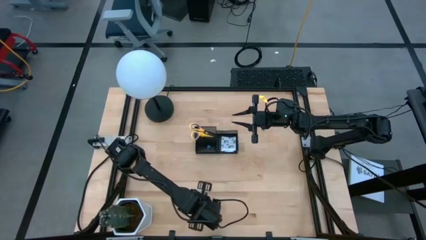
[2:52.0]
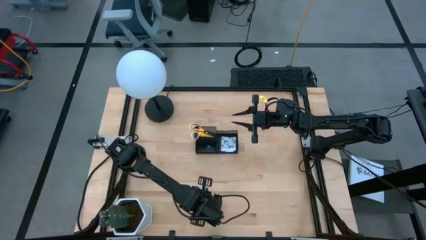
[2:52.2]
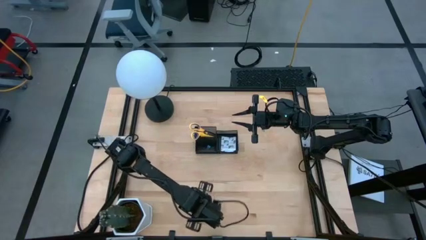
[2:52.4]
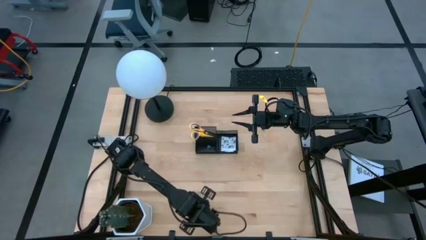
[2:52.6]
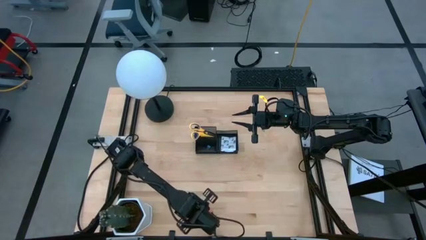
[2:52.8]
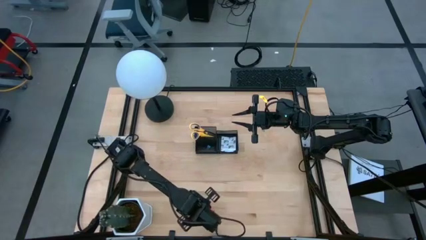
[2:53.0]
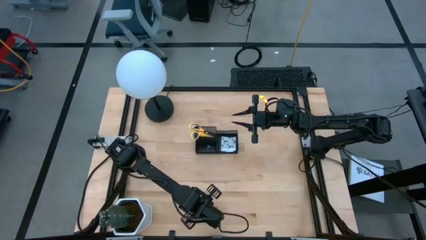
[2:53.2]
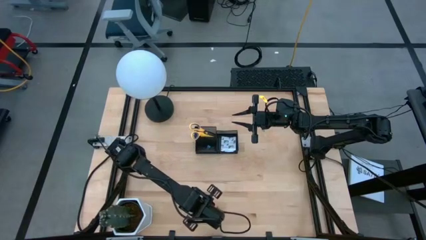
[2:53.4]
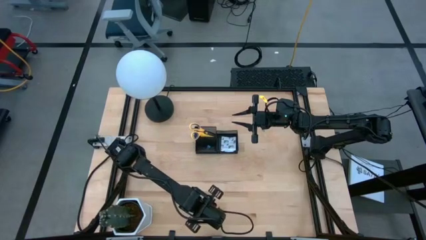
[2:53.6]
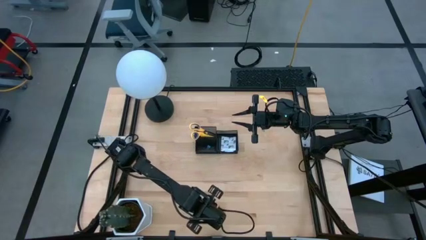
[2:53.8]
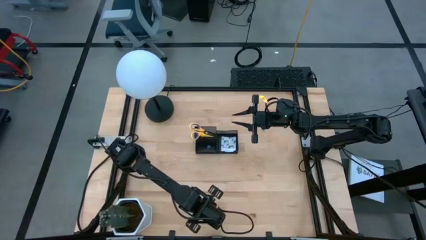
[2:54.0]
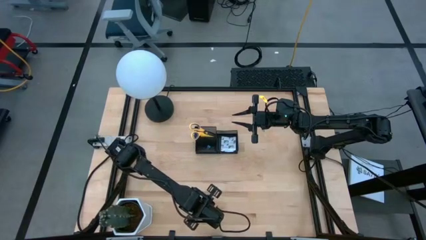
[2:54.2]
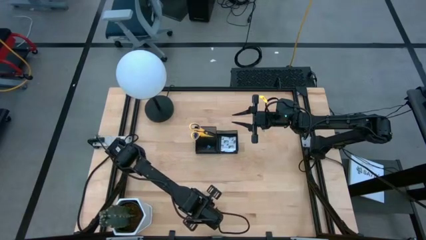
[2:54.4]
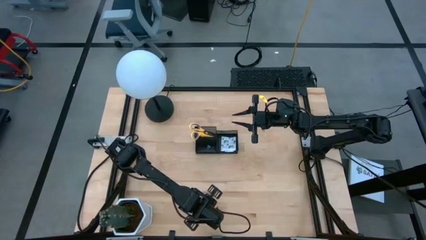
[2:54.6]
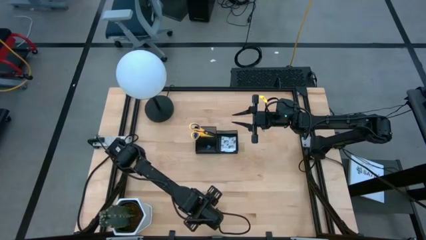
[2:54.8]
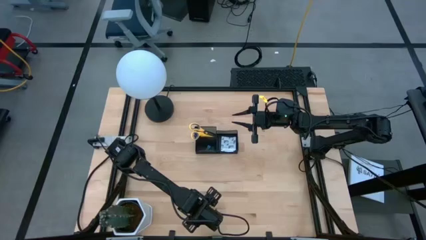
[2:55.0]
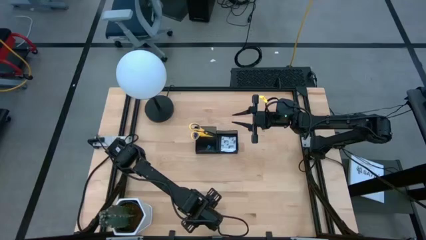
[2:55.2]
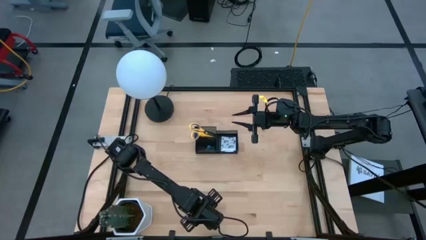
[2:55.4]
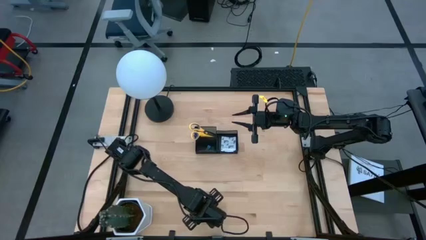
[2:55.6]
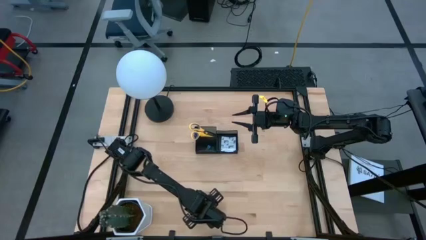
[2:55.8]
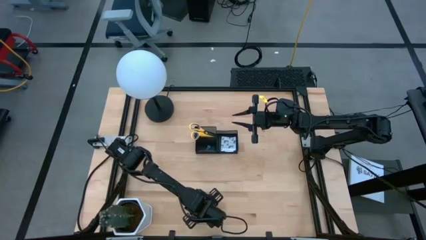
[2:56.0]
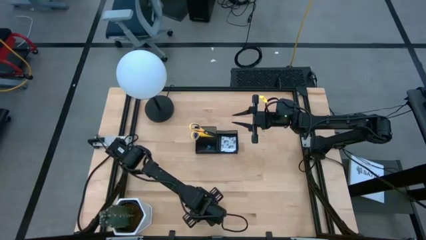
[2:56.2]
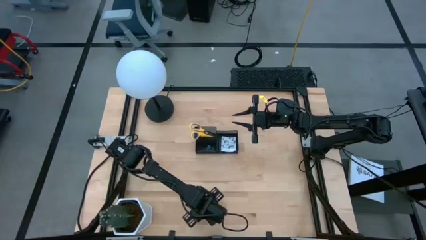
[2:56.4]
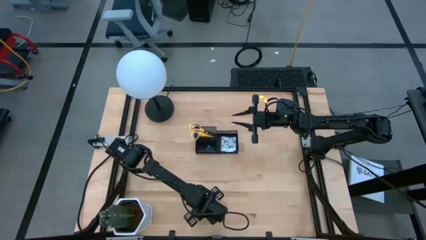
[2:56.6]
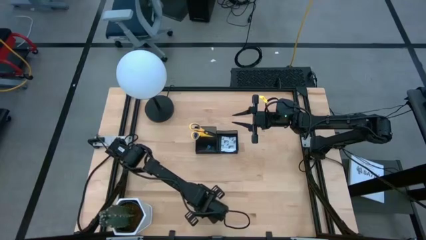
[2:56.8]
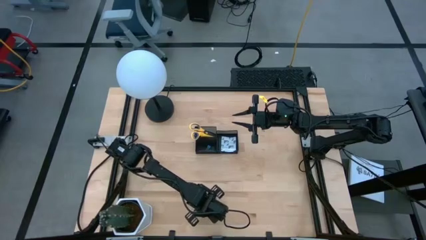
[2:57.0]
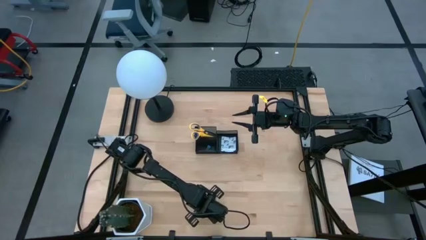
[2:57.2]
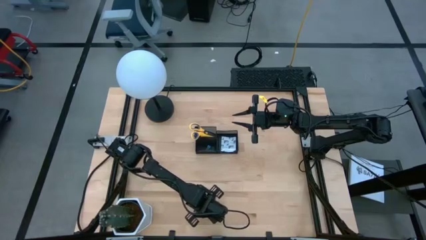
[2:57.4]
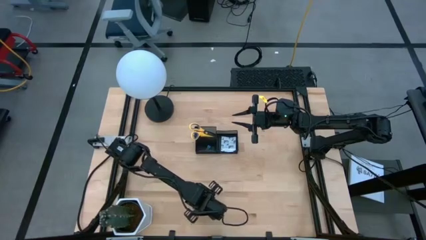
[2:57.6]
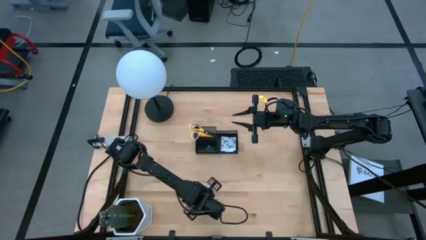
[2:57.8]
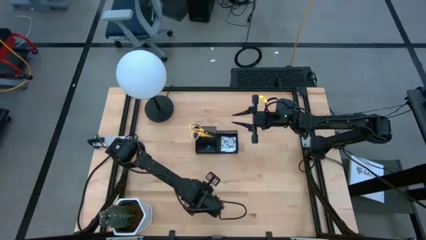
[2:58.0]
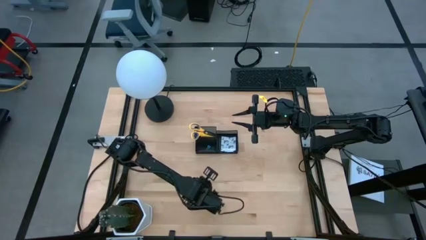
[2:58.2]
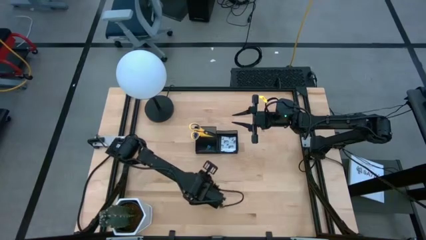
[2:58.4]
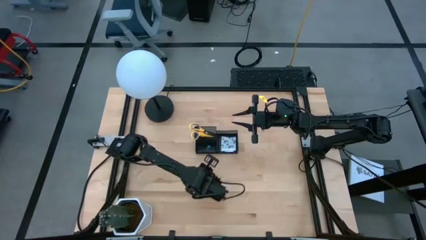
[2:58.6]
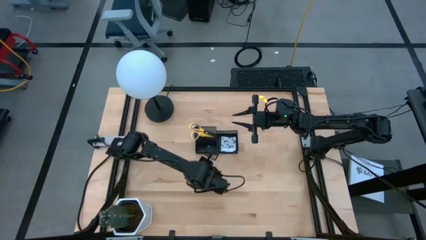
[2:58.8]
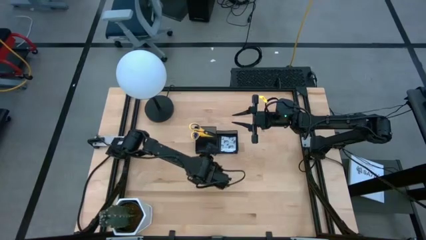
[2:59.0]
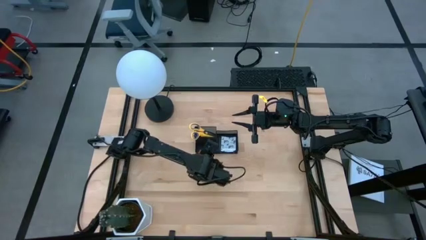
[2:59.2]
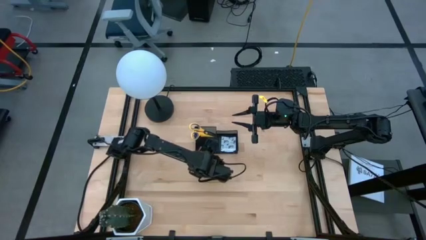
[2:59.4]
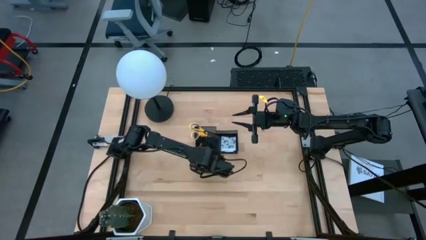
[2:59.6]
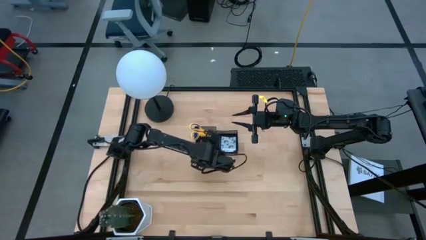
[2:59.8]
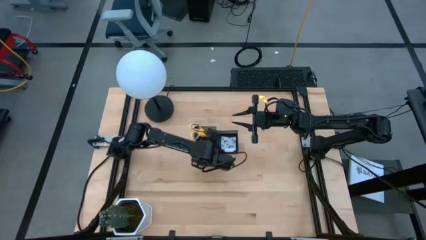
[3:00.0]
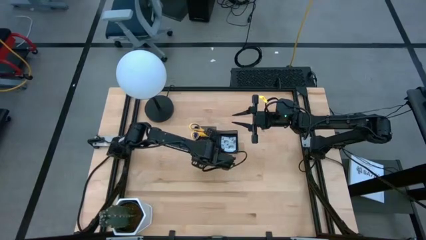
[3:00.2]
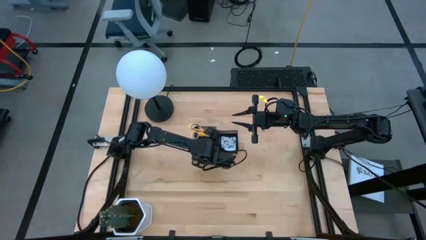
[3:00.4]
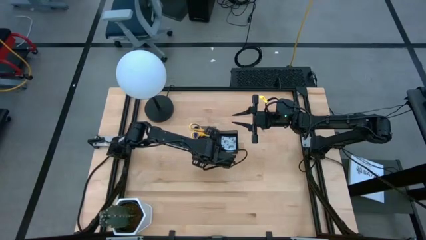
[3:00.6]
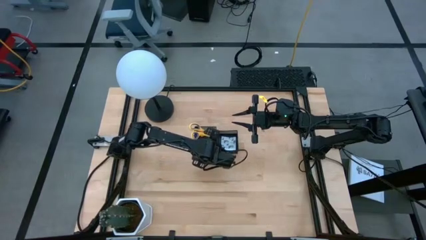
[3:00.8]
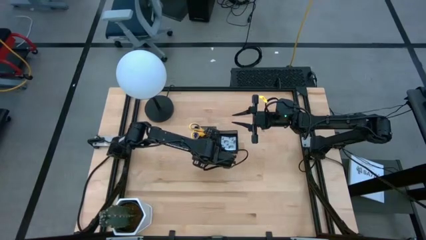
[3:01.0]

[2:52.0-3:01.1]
Task: Pick and place office supplies into organizer
Put the orange eraser into the desk organizer

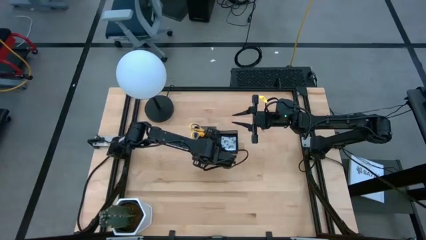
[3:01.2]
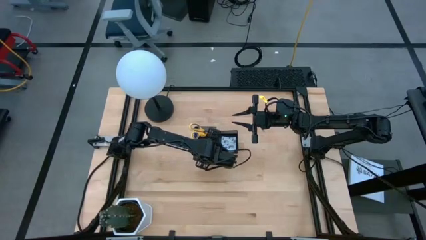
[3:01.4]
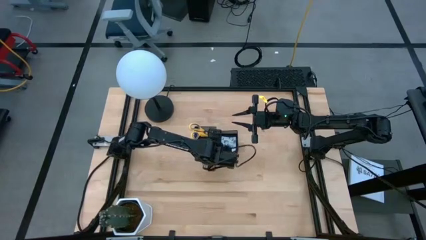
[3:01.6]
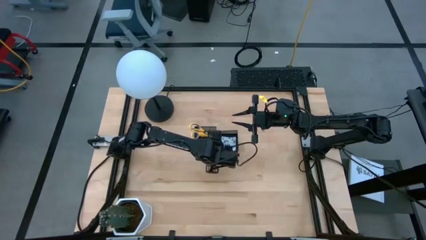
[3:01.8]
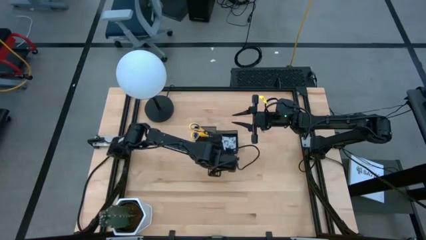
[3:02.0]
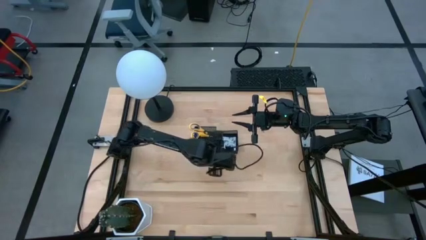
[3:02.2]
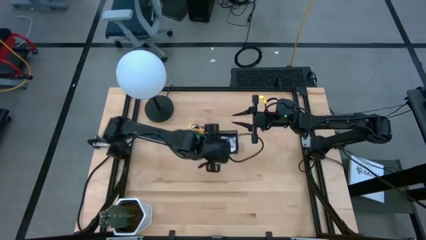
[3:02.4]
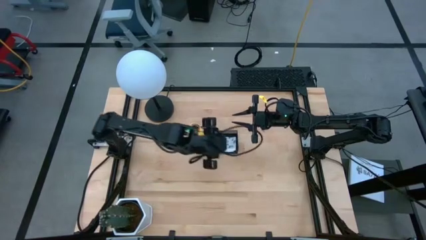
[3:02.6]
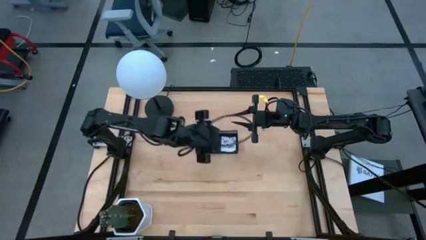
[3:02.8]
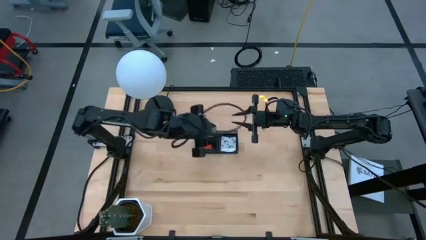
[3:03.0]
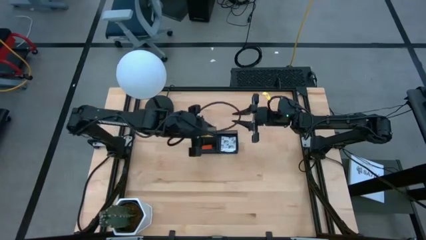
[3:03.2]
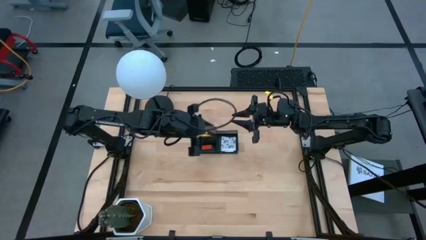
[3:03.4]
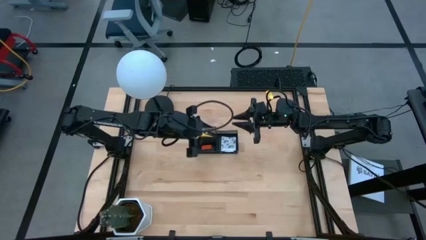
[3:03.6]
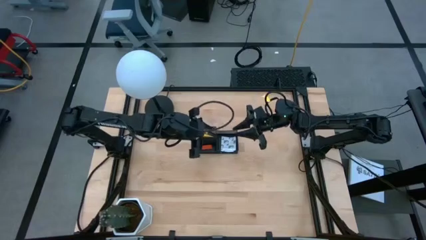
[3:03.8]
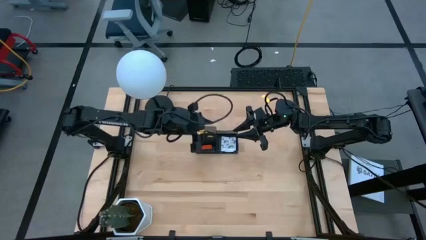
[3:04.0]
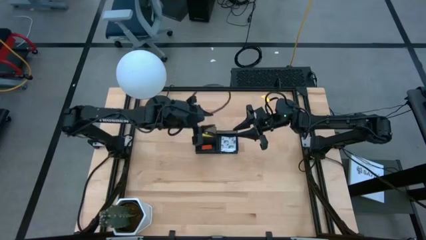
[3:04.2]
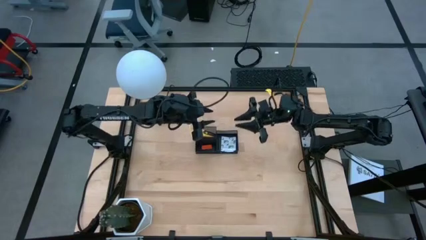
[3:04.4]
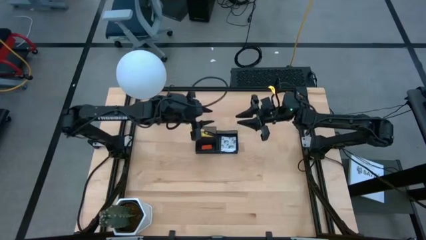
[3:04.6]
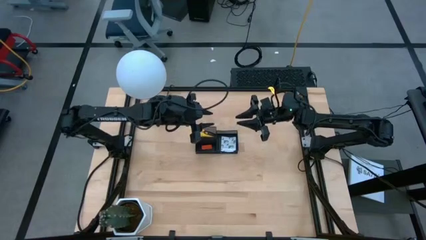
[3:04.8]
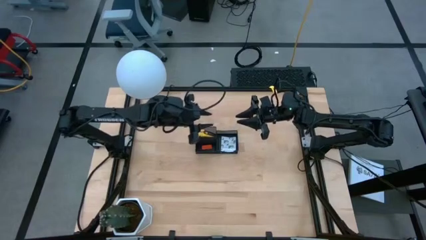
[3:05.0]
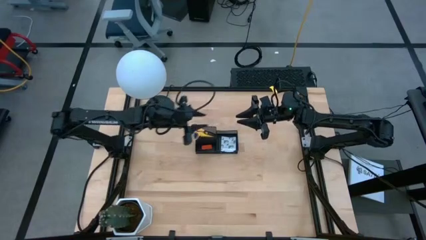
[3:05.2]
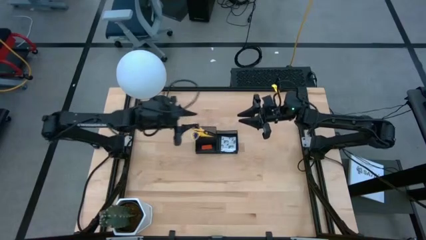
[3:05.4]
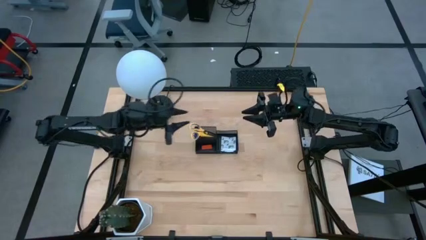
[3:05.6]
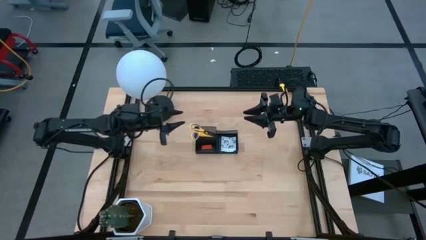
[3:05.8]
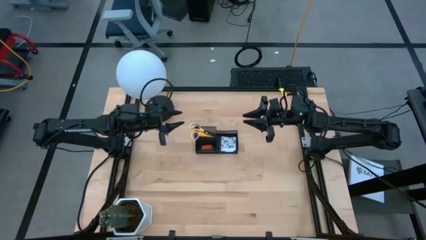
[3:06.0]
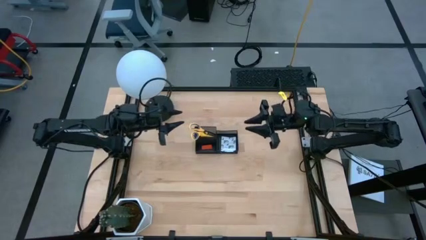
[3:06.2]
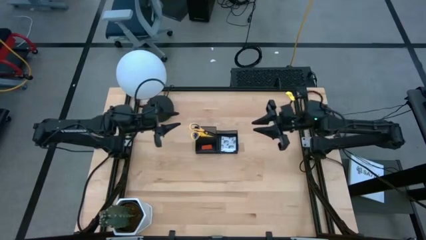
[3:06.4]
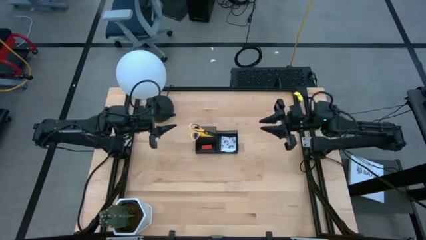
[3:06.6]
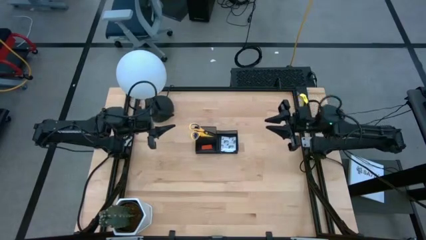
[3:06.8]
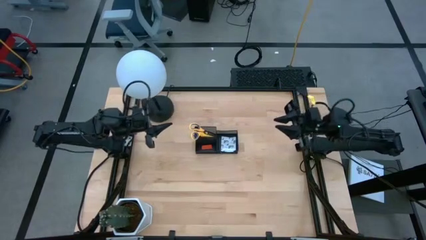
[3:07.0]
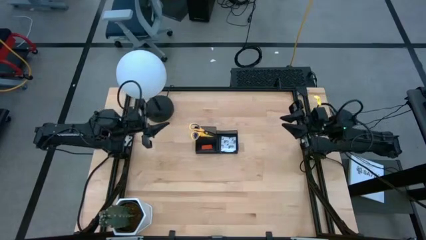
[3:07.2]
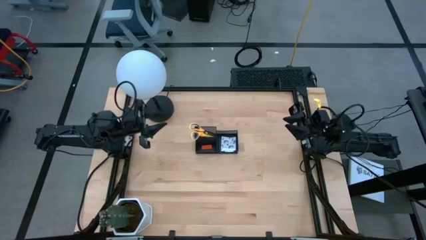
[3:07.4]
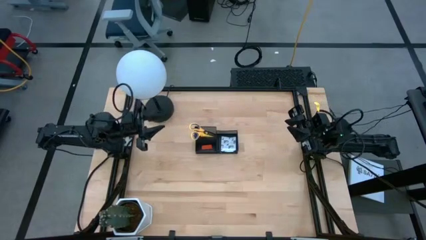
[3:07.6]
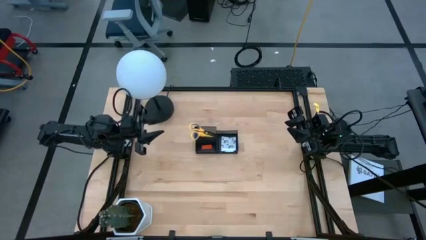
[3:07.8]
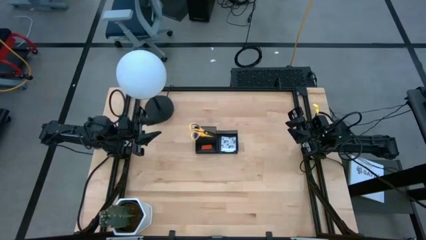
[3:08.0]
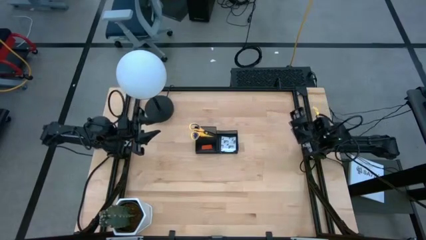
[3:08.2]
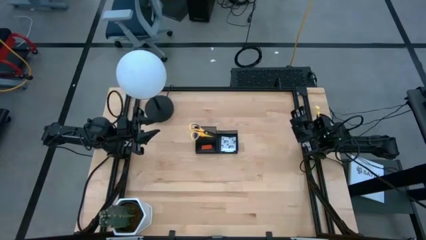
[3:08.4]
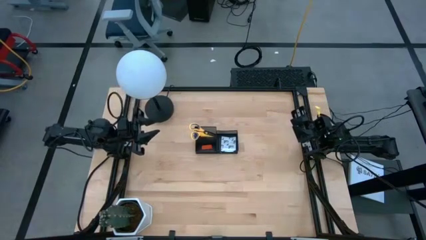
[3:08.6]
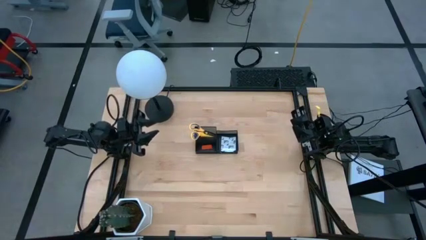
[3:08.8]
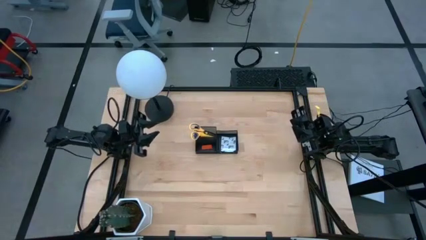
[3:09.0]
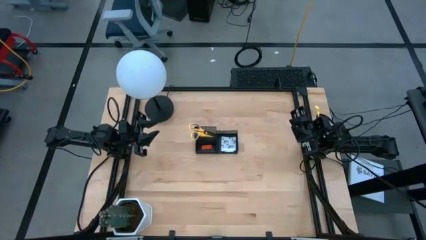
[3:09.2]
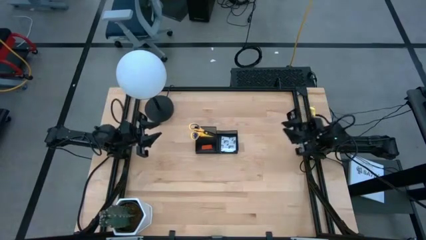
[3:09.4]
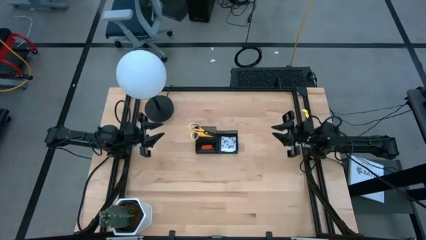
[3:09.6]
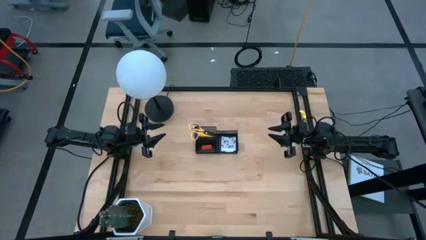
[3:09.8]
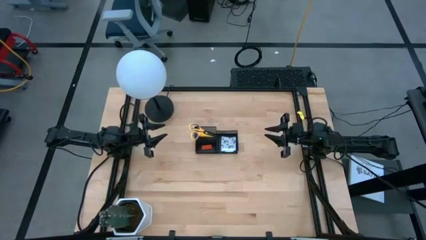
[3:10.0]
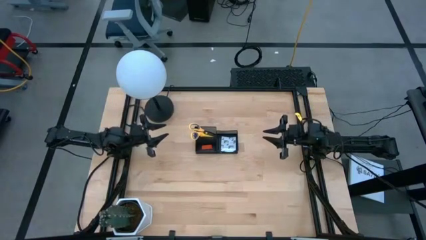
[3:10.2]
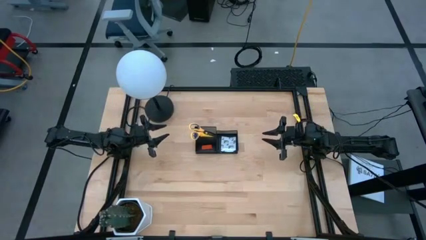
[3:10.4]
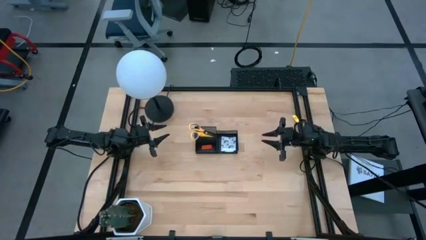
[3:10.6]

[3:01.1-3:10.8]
Return to Home Position
